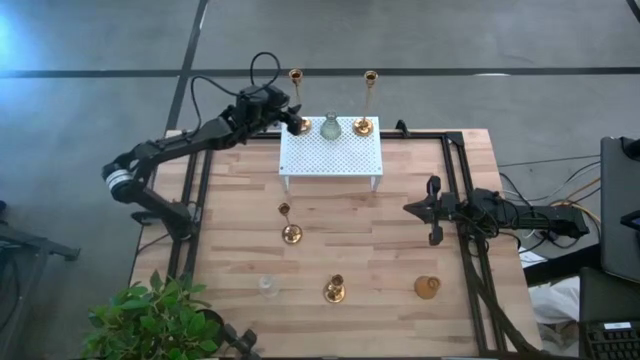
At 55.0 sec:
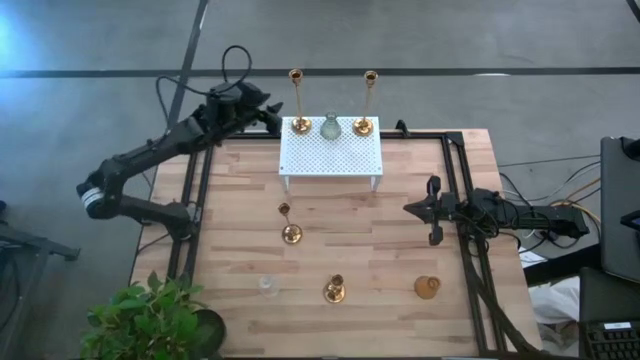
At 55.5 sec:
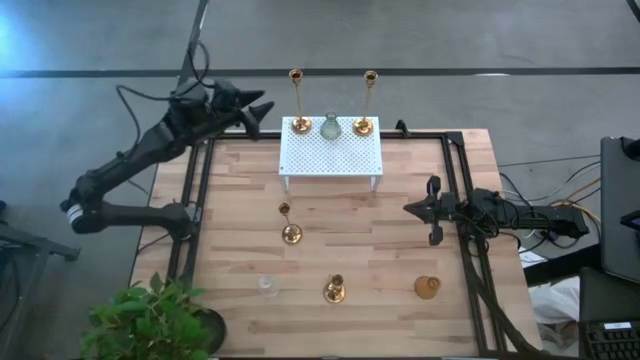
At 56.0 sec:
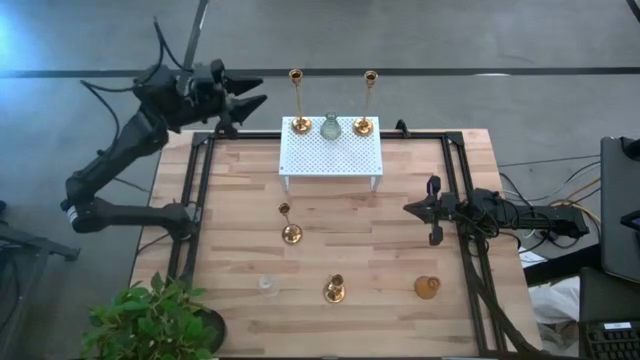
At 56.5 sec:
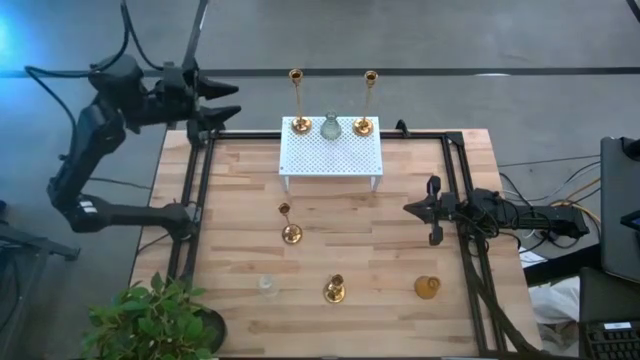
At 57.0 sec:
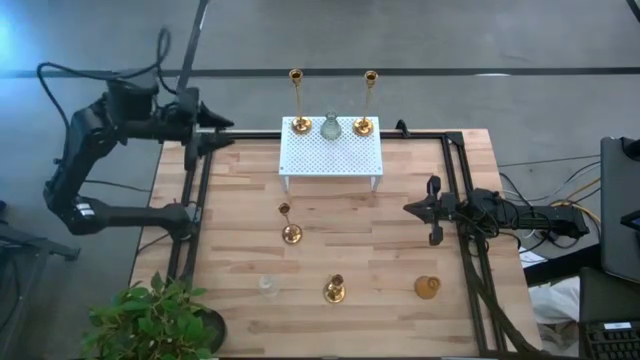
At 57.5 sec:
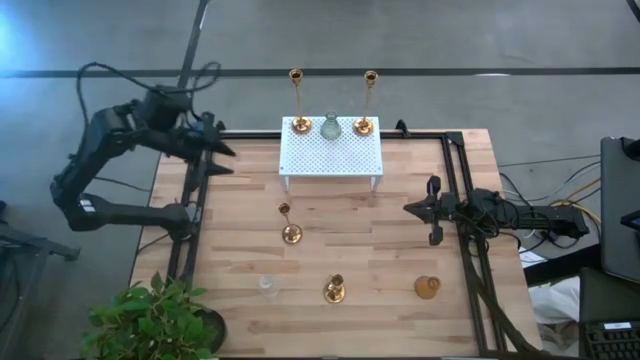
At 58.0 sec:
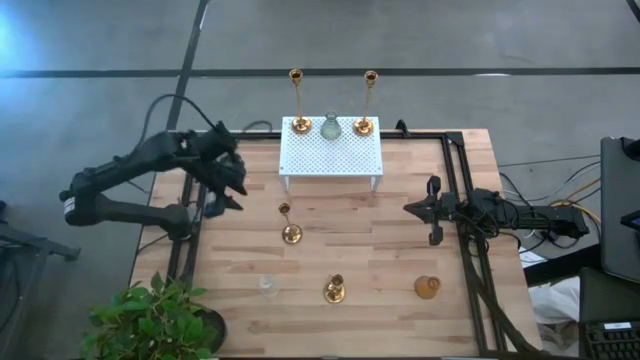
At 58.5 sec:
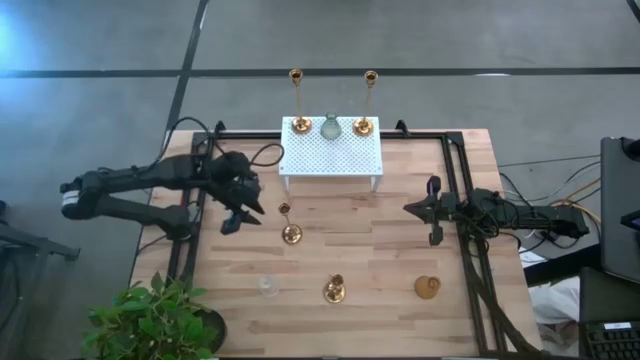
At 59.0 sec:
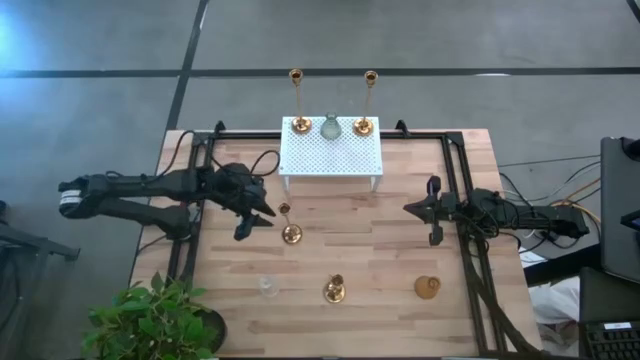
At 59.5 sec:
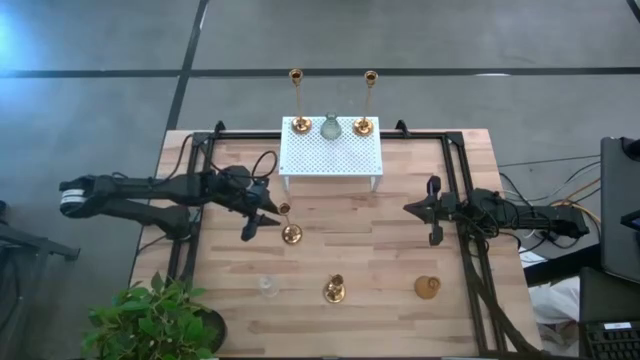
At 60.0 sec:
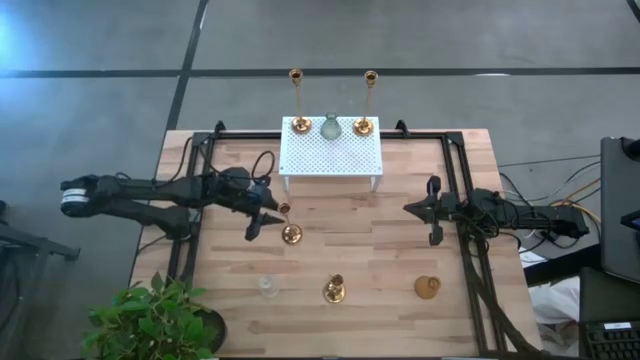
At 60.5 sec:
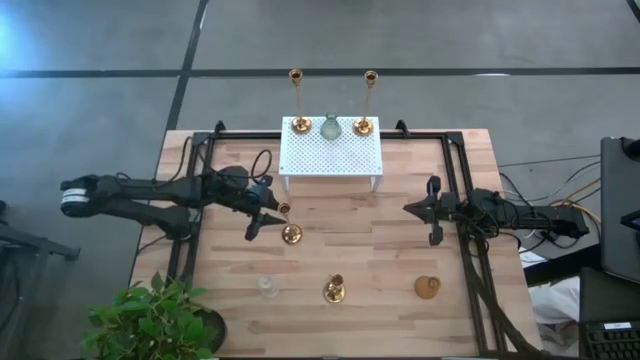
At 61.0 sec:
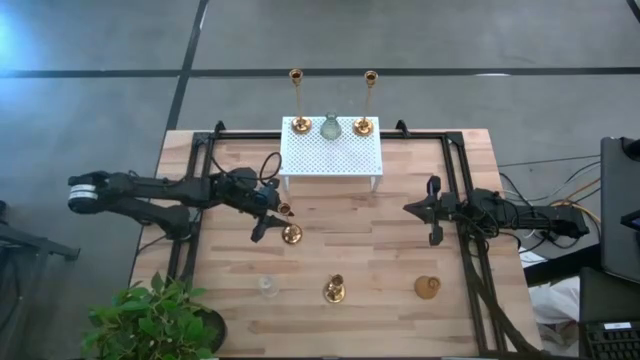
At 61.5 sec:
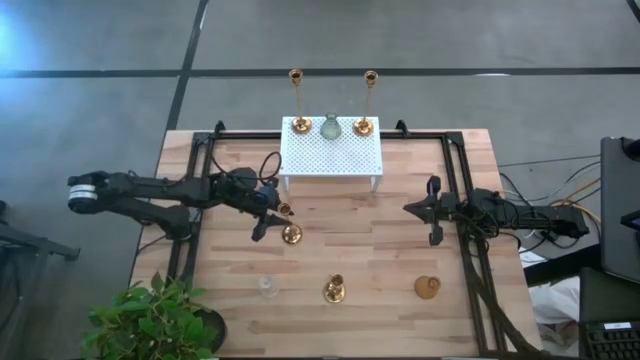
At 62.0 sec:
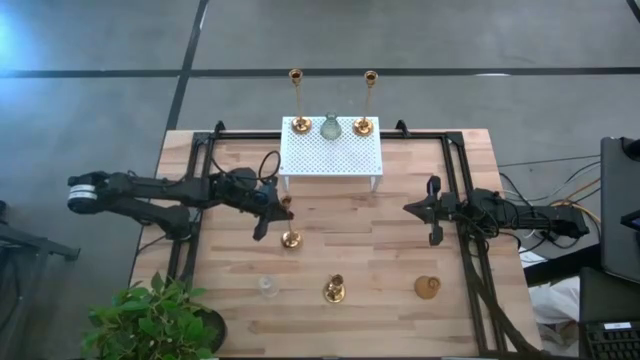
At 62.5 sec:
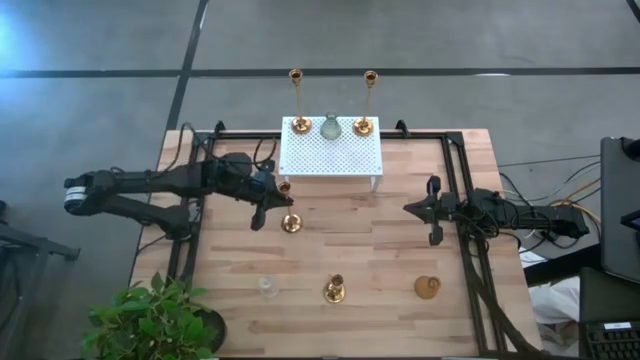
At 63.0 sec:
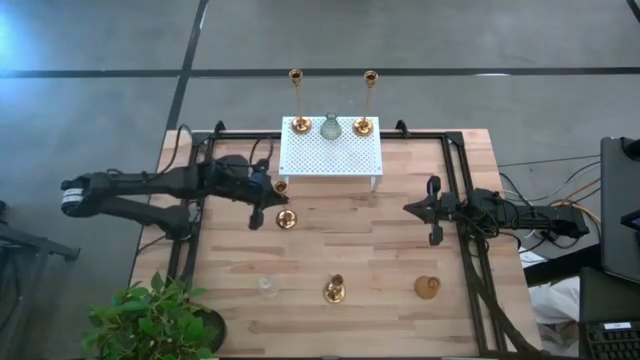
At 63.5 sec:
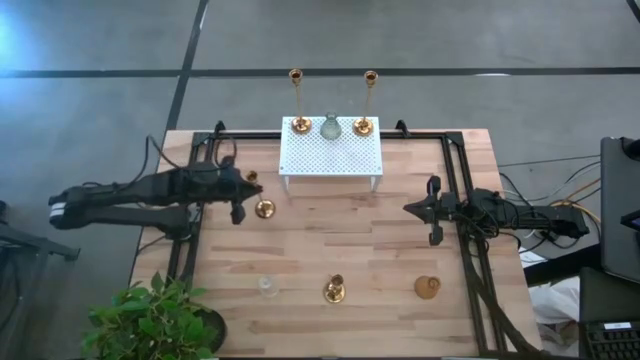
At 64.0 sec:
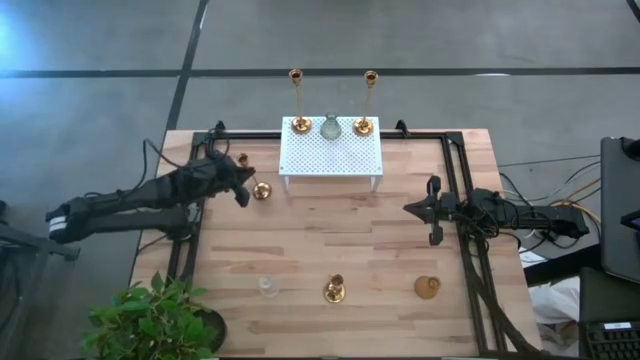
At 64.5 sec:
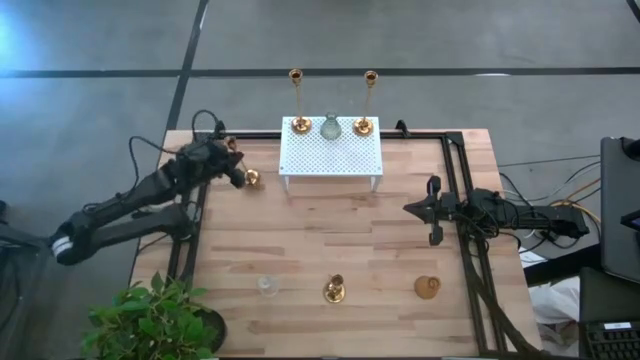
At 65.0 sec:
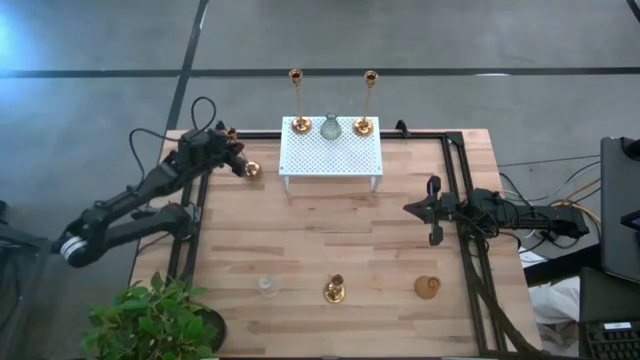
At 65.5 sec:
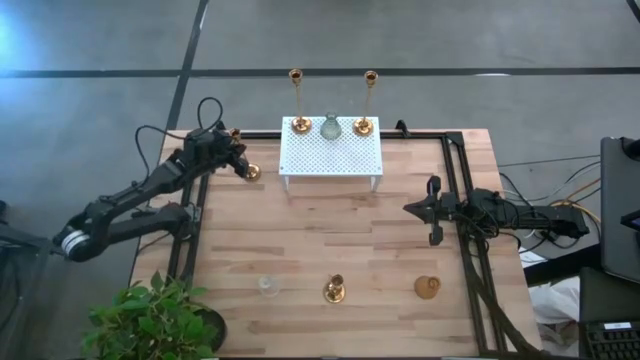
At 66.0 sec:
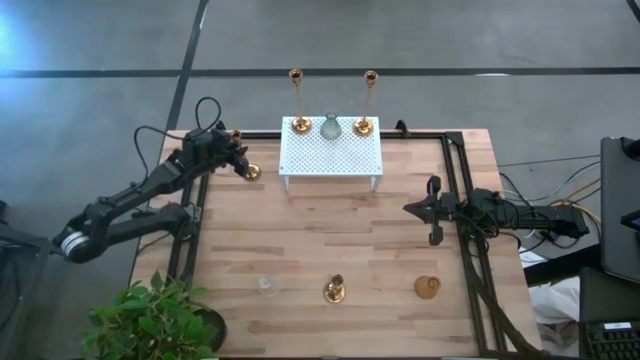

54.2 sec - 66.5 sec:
Task: Pick & Place candle stick holders
Move the gold candle holder to the top left of the table

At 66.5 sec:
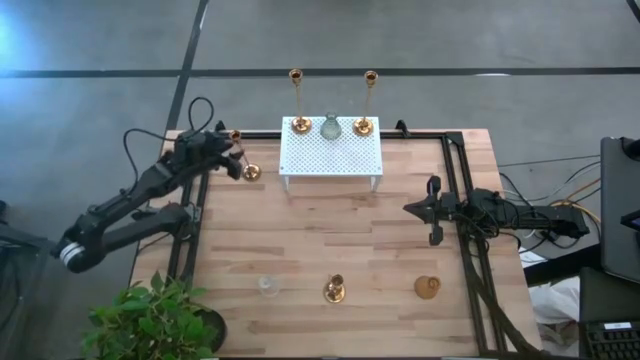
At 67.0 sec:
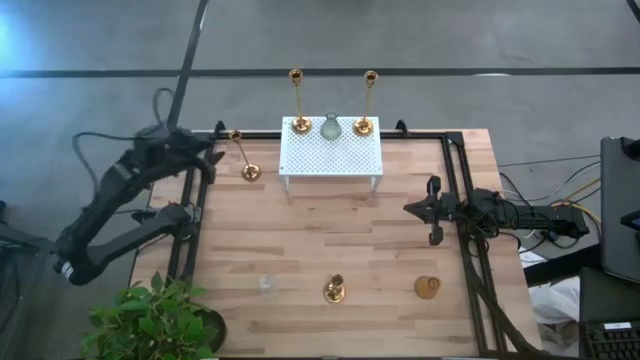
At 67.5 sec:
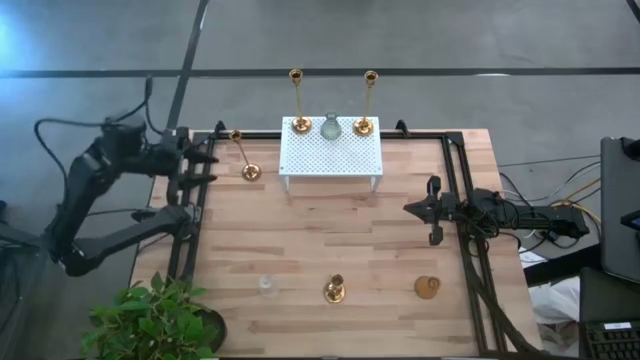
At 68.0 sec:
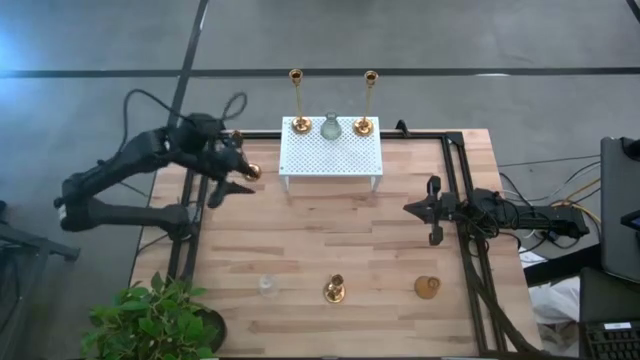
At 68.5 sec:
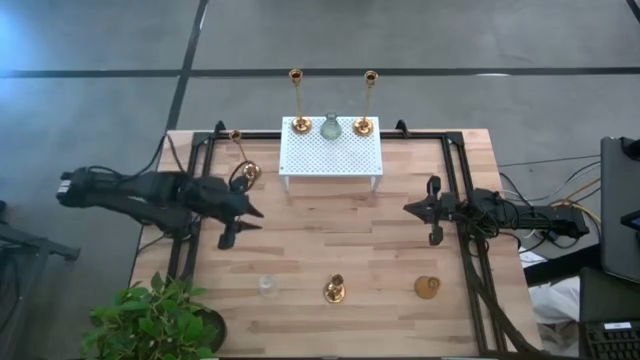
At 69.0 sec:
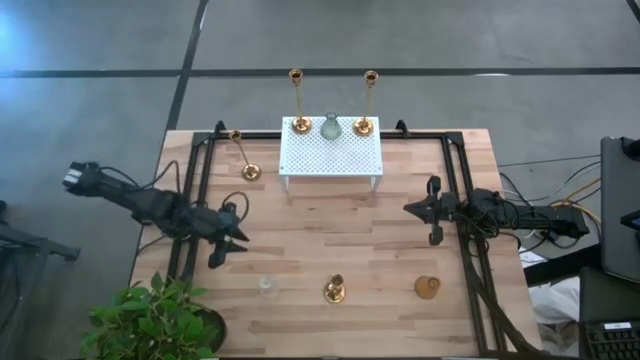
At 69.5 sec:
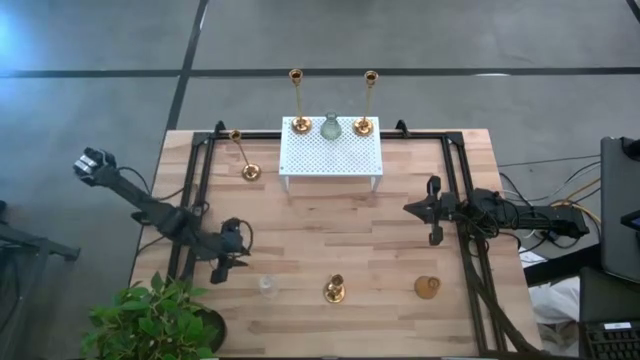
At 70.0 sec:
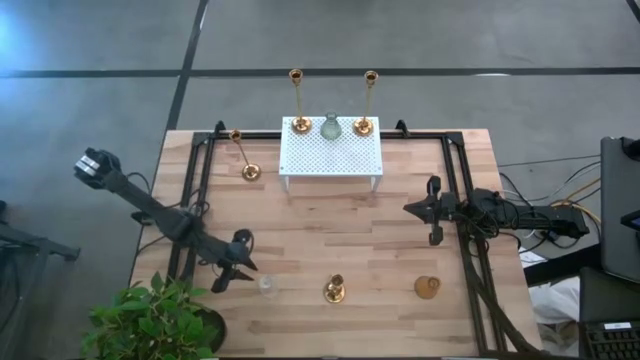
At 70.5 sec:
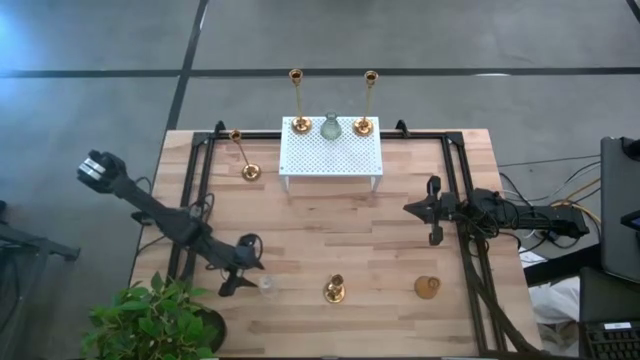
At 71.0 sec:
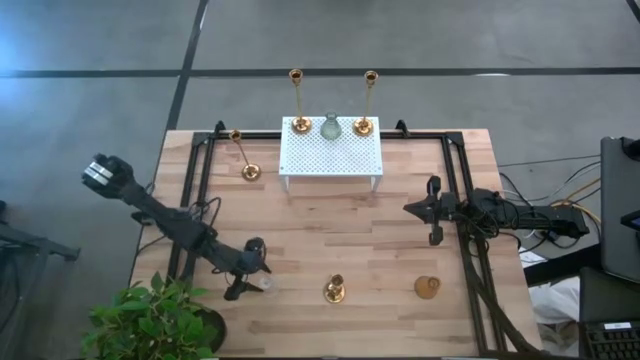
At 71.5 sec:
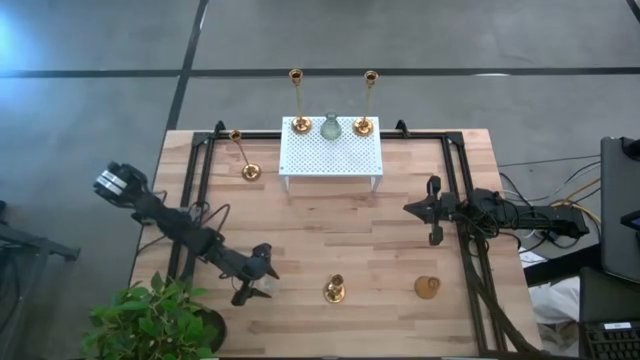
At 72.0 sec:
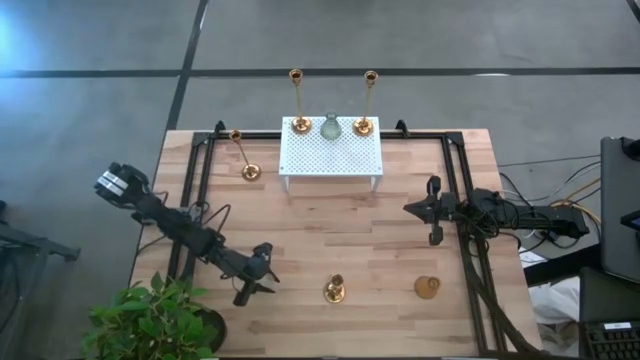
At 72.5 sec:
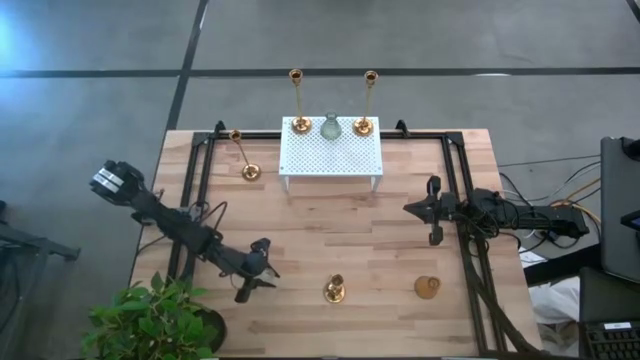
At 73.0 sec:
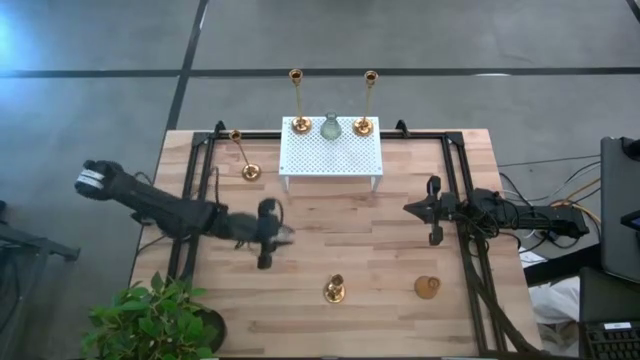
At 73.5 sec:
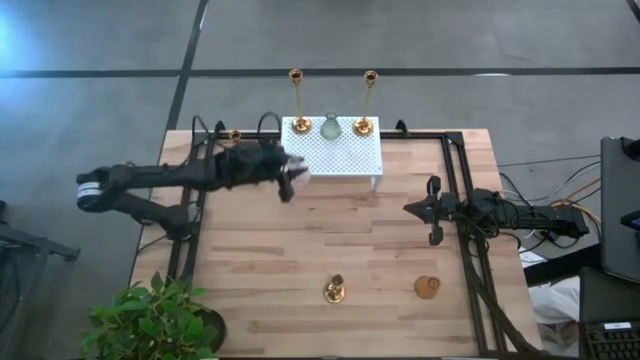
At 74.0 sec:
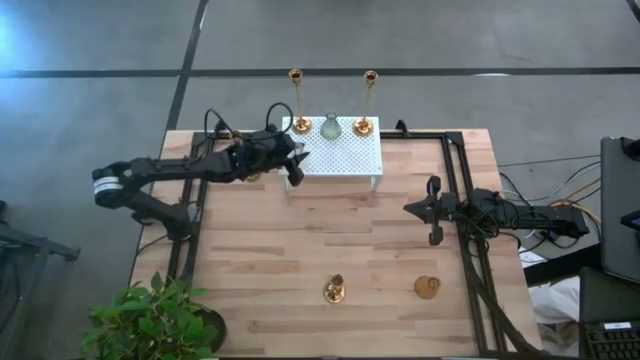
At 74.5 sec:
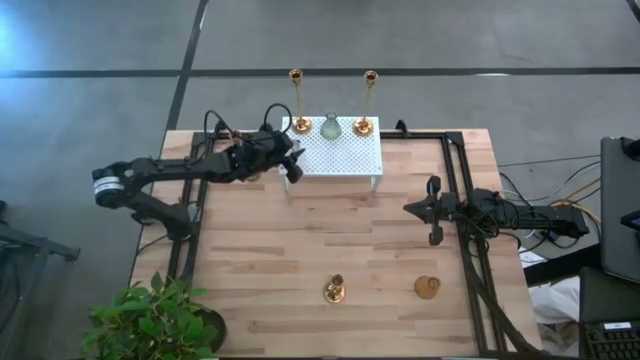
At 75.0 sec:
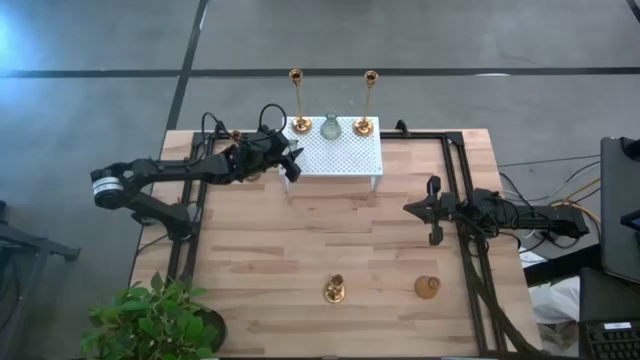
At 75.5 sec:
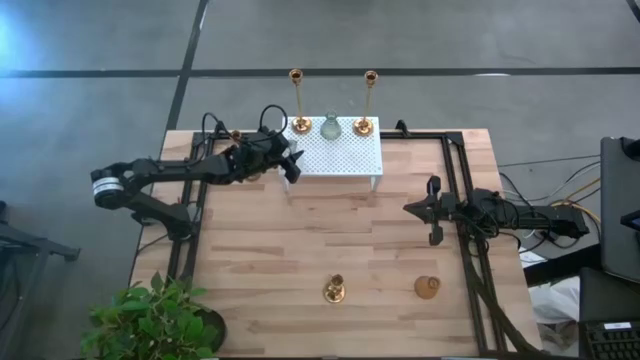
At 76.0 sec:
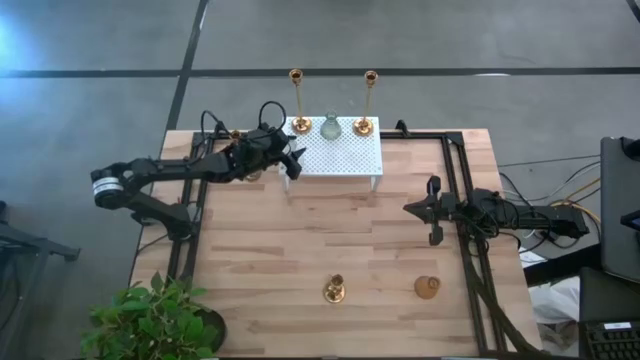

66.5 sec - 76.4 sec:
Put the white glass candle holder on the shelf
